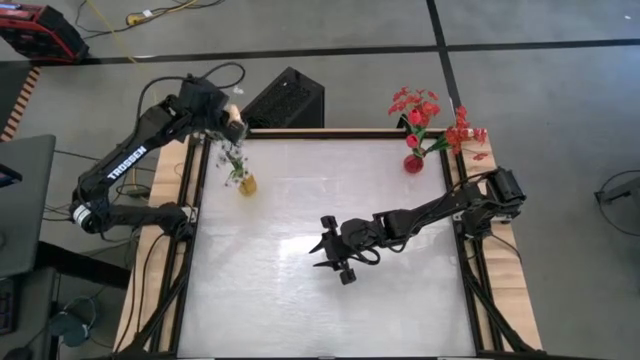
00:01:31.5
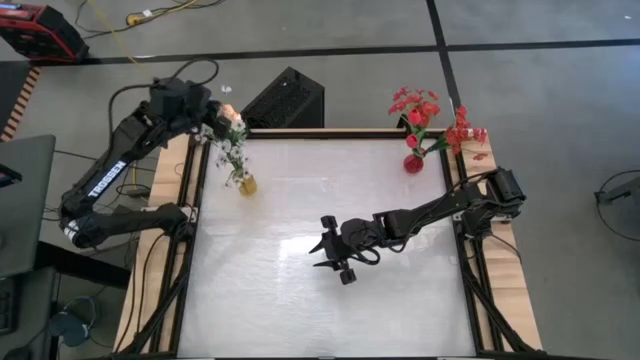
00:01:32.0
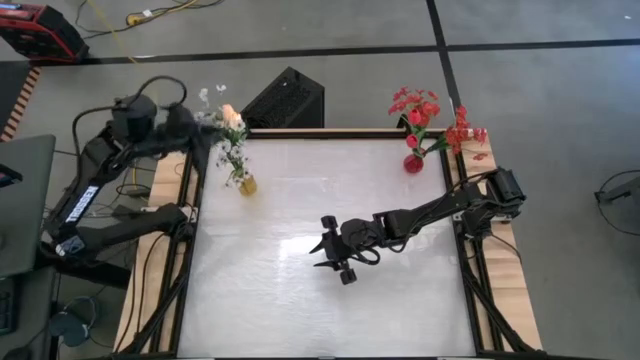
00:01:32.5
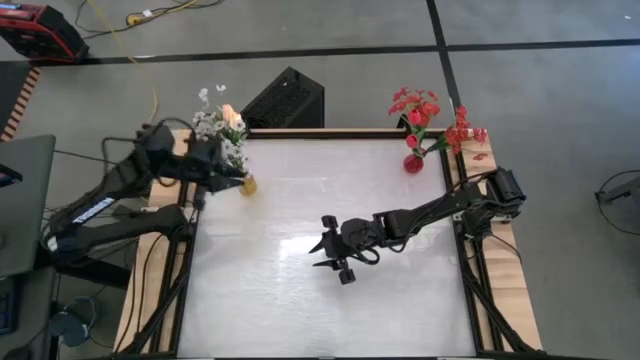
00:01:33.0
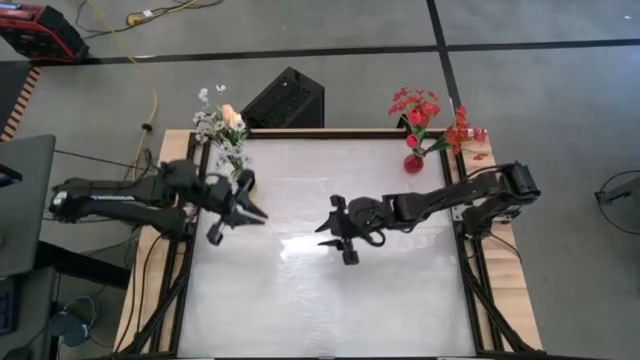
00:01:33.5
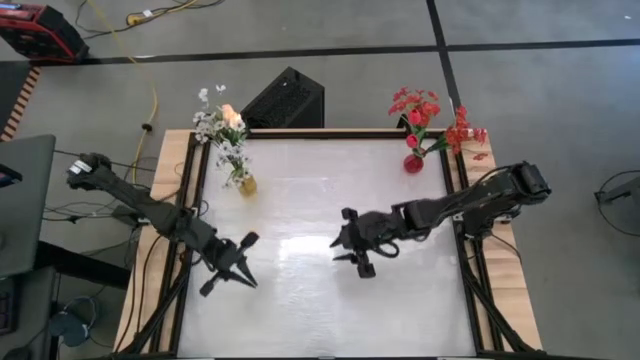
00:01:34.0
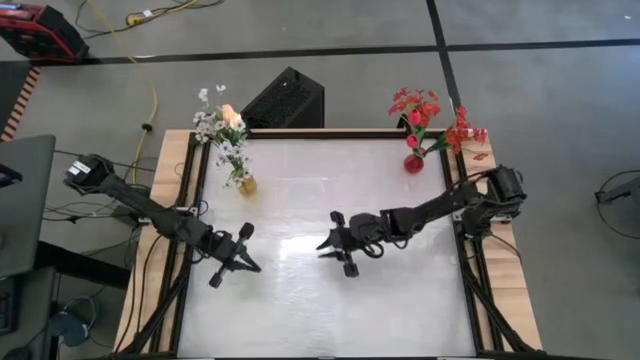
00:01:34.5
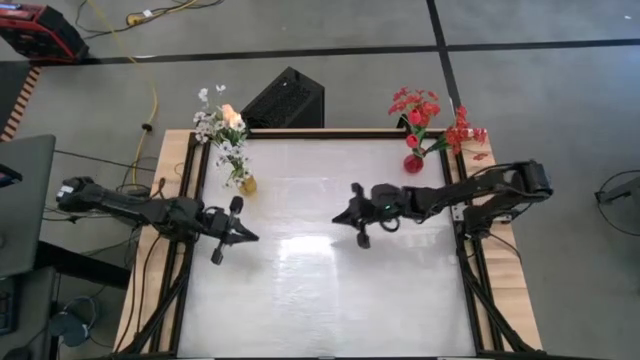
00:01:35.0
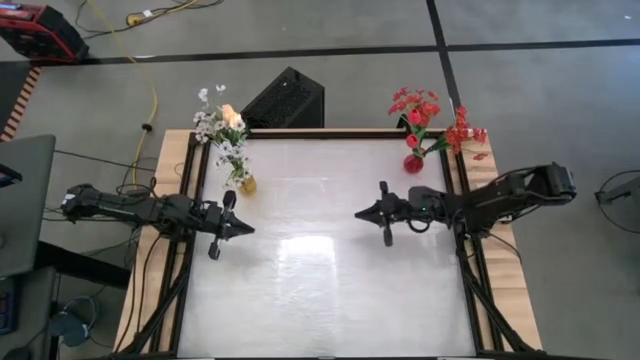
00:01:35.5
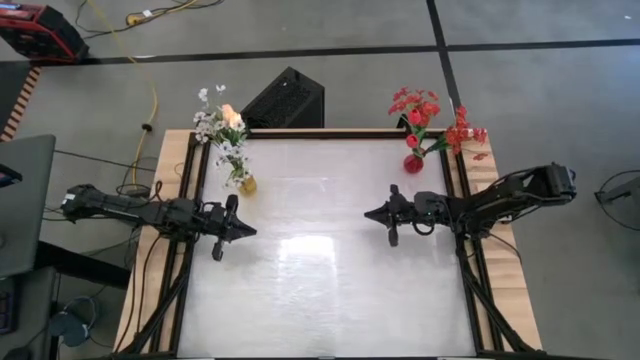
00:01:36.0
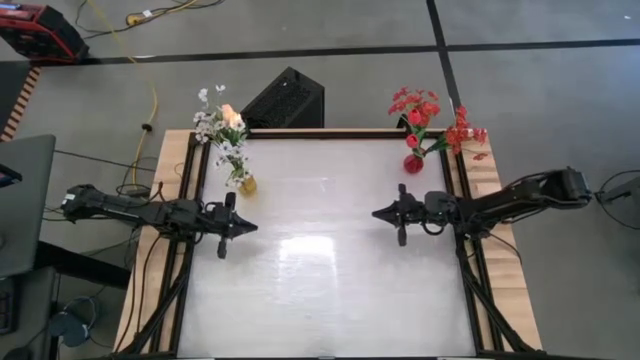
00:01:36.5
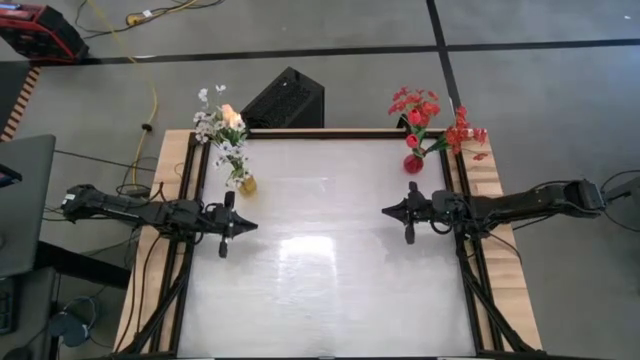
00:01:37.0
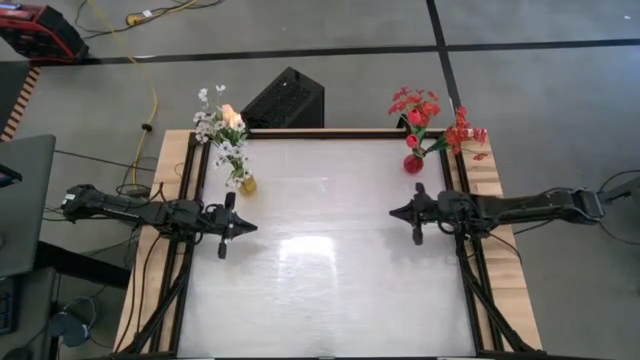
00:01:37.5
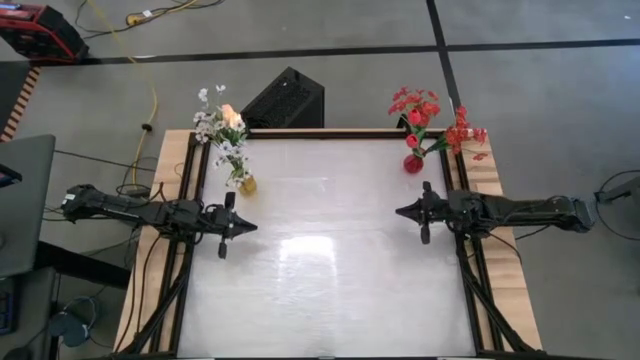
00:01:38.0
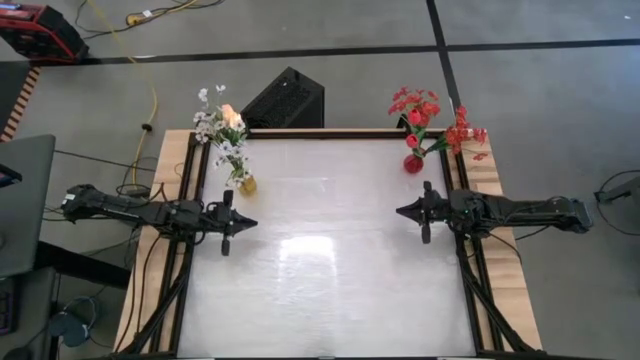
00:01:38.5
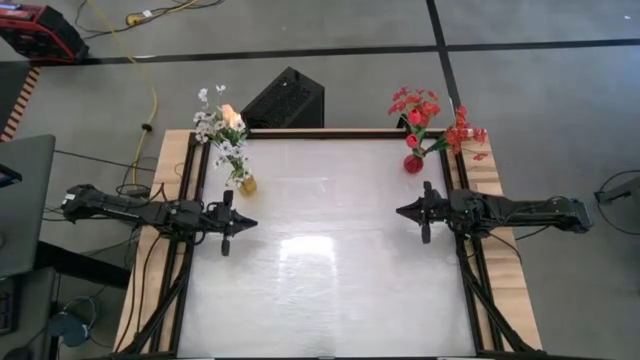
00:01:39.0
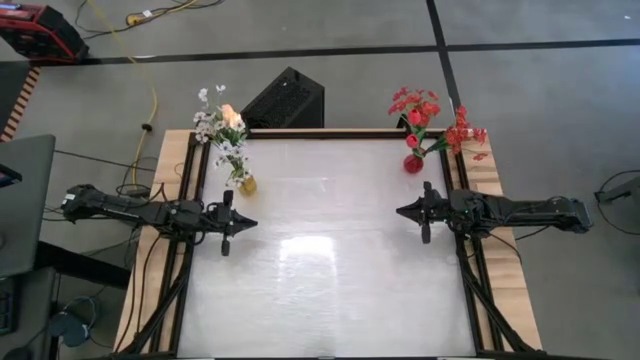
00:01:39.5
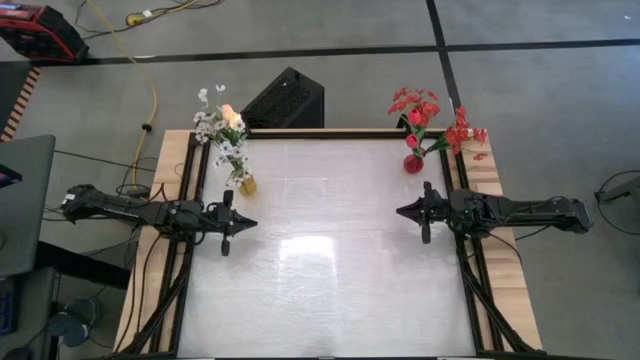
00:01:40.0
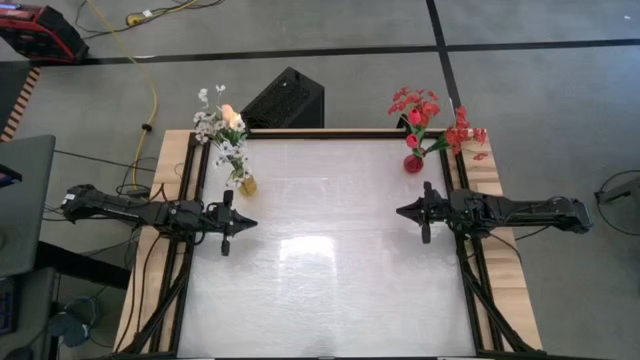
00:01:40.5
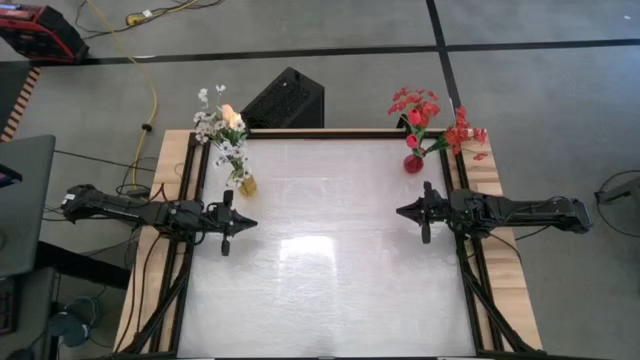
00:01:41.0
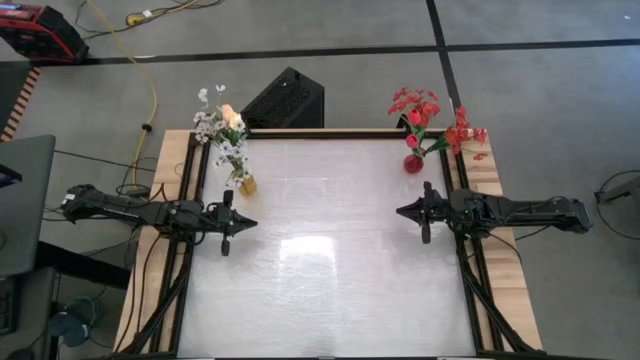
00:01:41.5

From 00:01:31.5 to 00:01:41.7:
Task: Sort flowers into vase by color
Return to Home Position

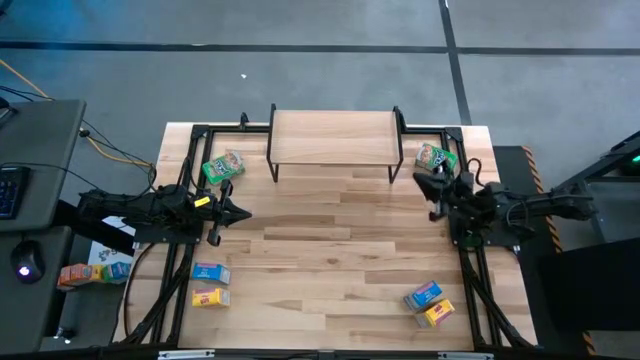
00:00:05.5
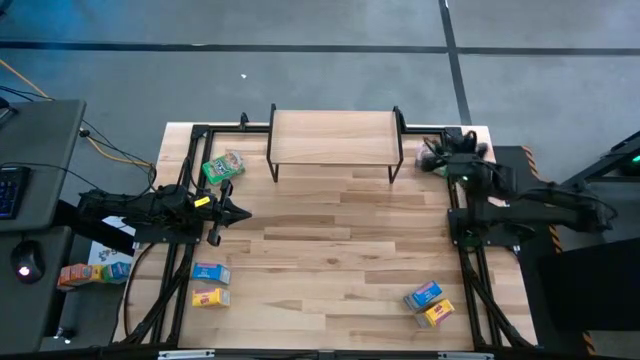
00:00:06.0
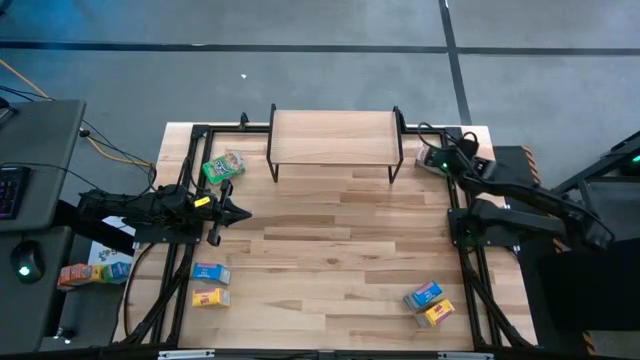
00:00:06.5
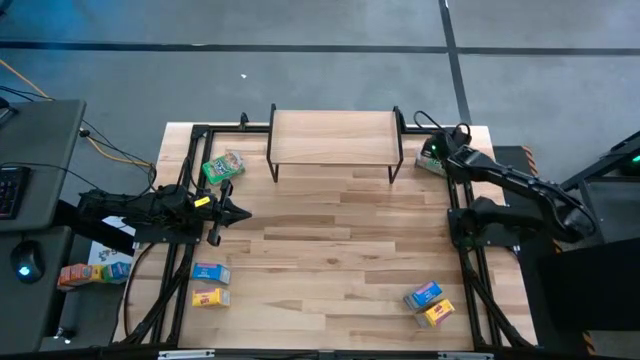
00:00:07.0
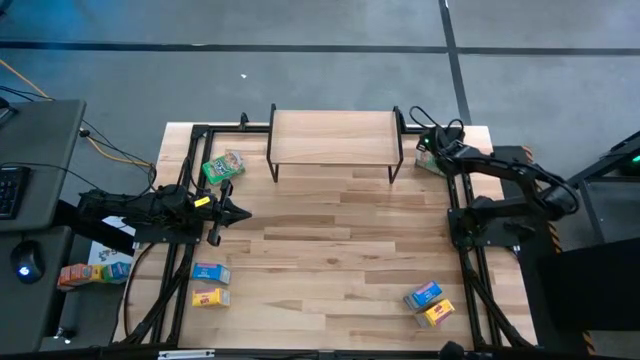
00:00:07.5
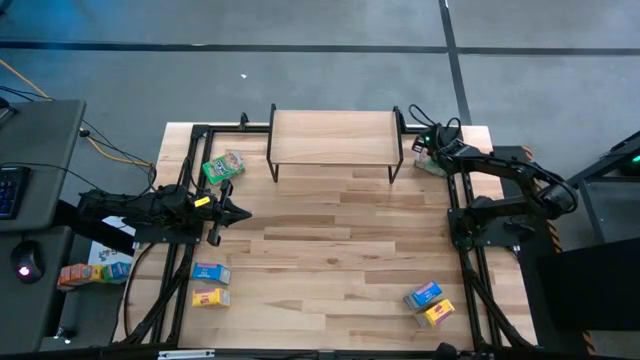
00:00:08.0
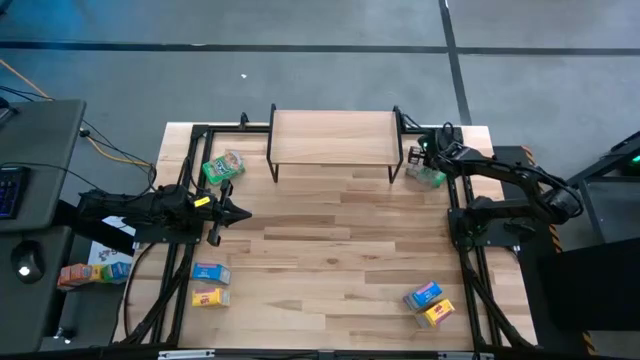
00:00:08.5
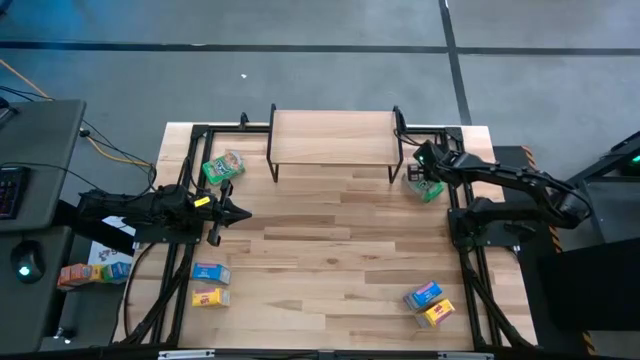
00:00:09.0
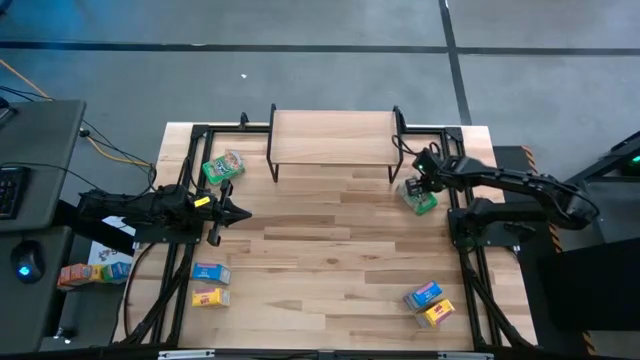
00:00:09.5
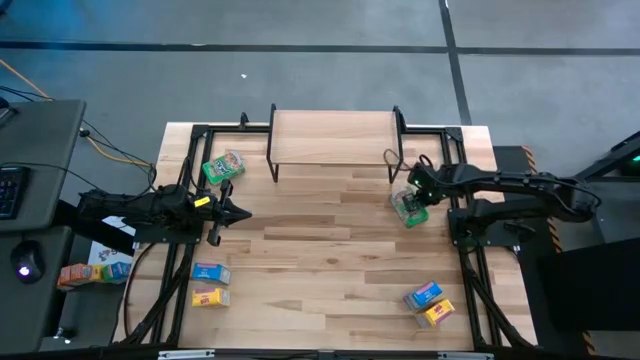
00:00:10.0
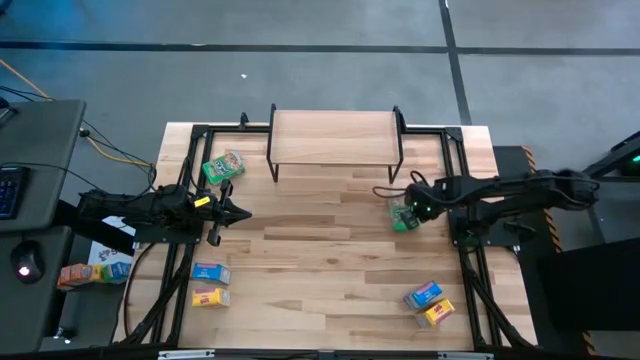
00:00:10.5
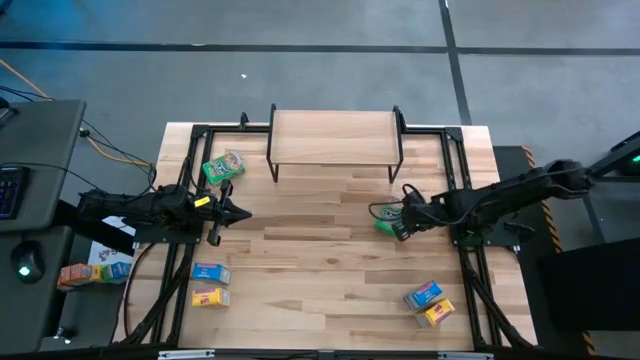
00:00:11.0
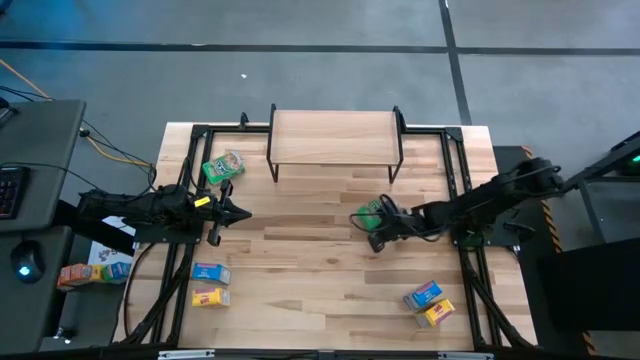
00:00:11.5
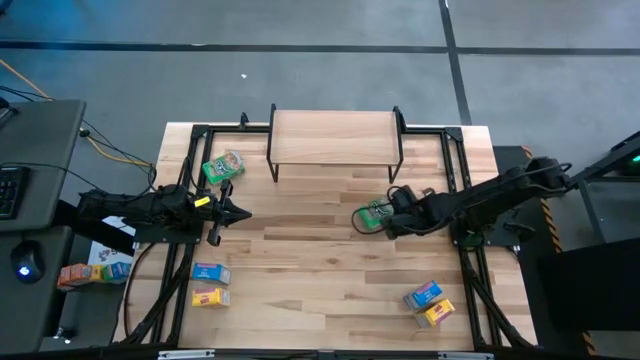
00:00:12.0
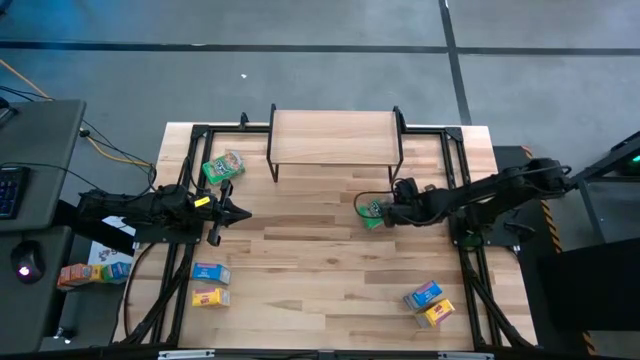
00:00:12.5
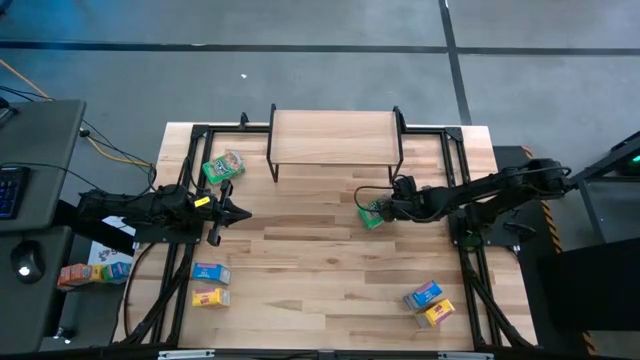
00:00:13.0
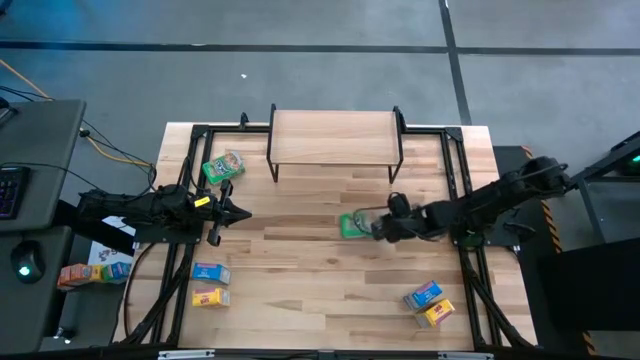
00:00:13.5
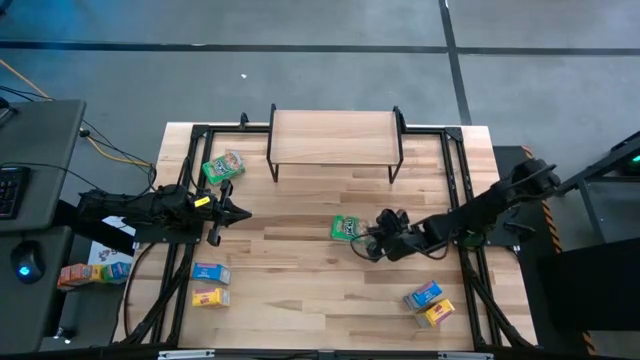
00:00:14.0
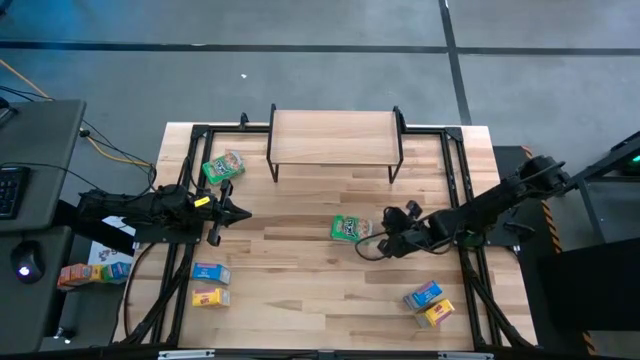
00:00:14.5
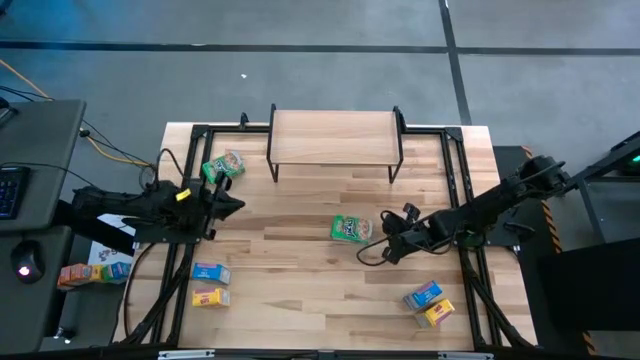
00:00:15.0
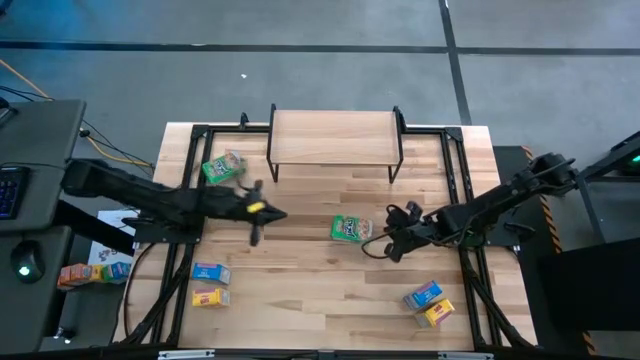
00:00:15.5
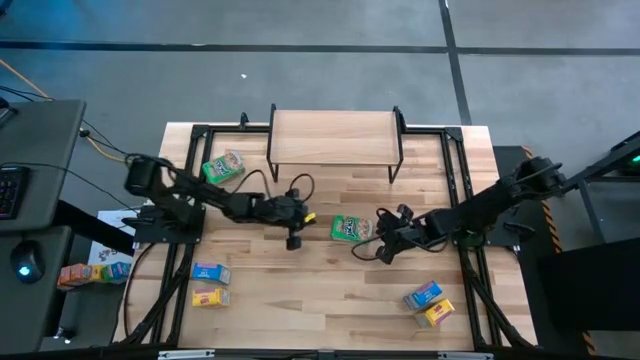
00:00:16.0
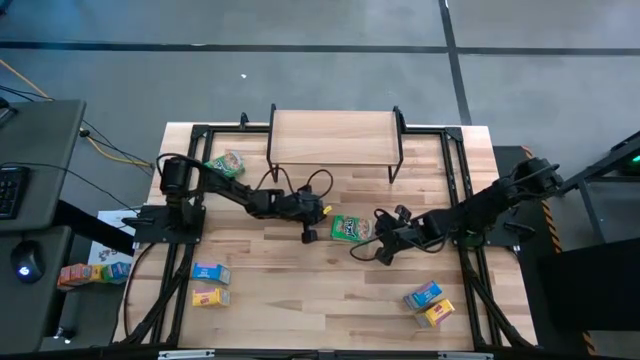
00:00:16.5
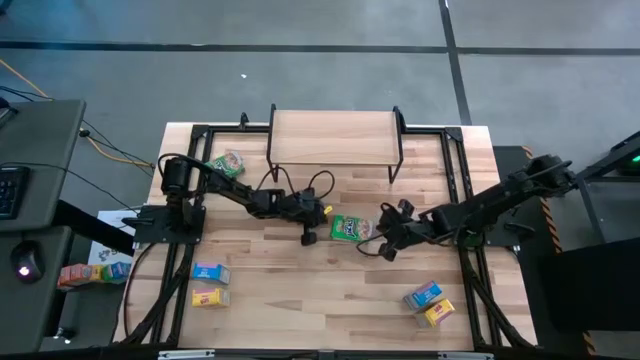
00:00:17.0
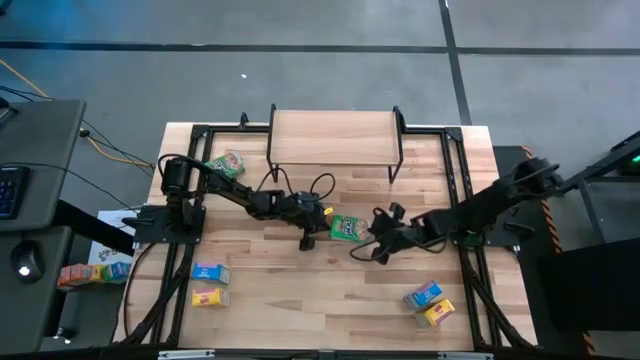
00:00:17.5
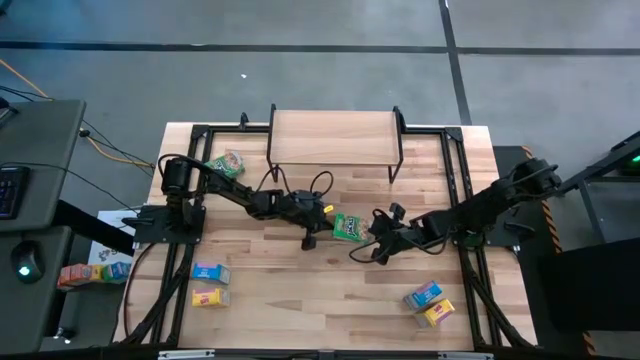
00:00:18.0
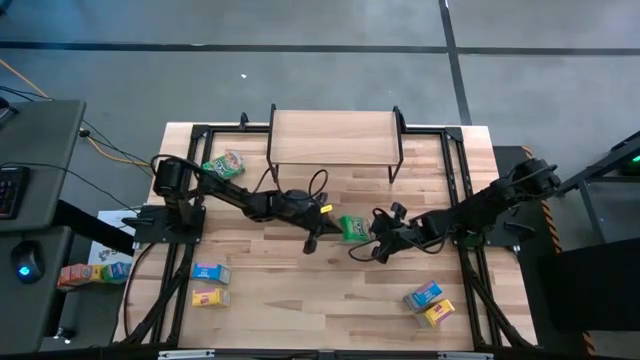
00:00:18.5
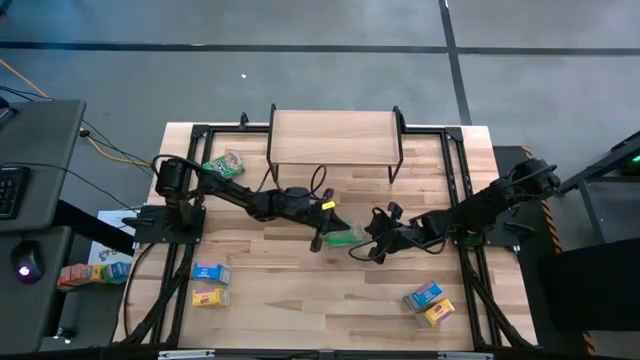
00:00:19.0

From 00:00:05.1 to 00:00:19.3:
Task: Stack cereal on shelf
Move the right green cereal box on the shelf
